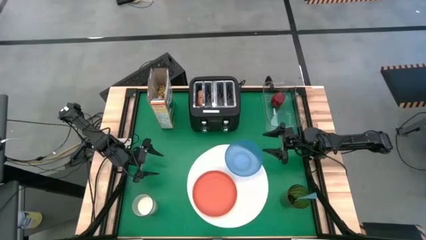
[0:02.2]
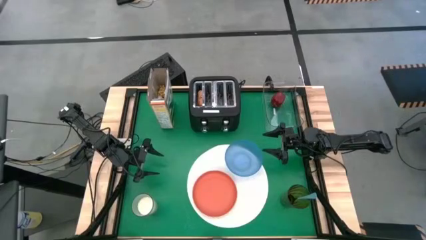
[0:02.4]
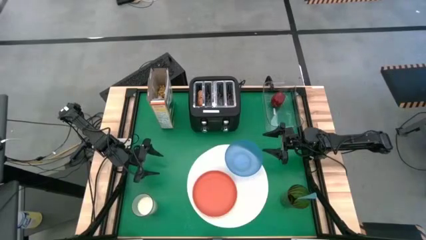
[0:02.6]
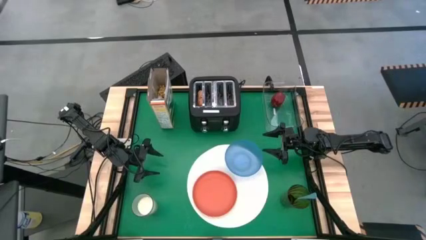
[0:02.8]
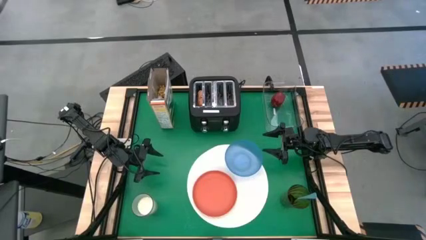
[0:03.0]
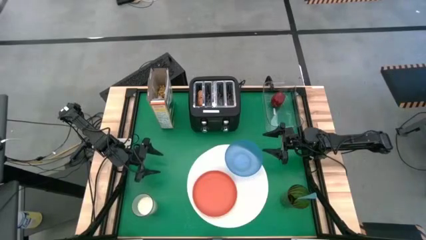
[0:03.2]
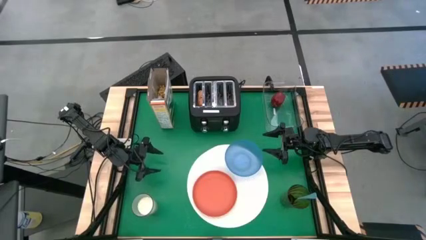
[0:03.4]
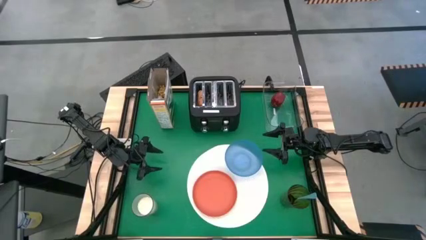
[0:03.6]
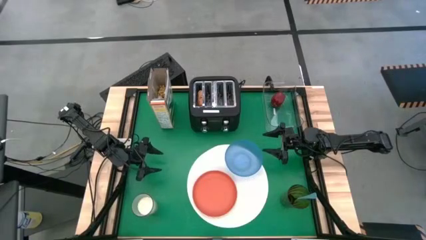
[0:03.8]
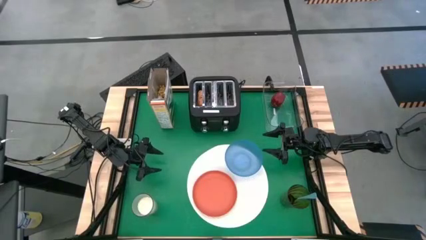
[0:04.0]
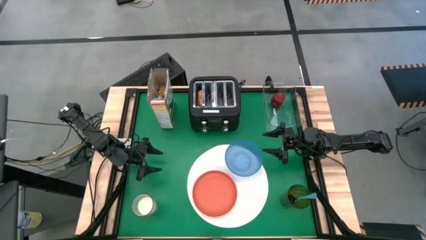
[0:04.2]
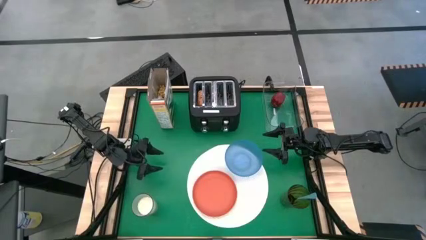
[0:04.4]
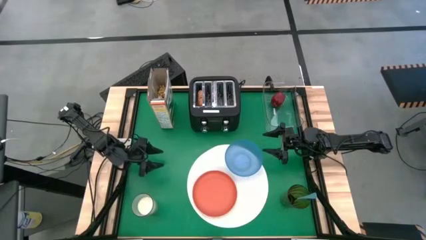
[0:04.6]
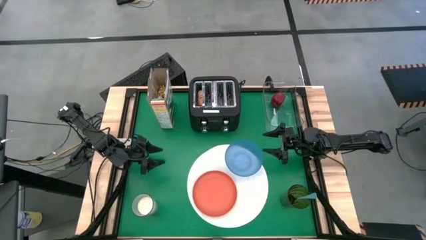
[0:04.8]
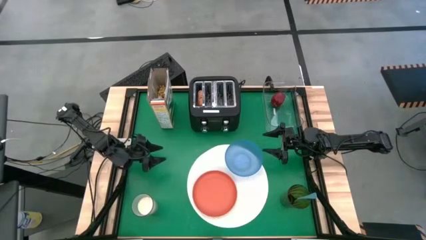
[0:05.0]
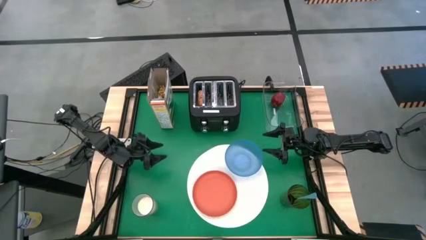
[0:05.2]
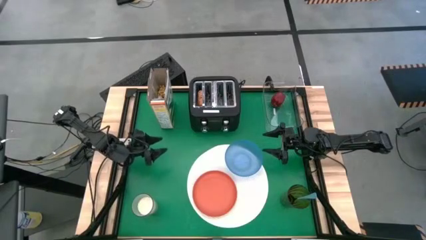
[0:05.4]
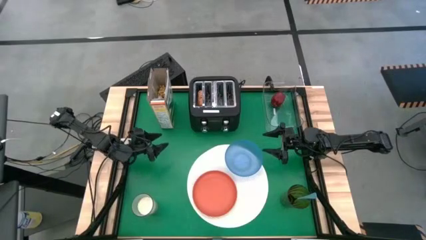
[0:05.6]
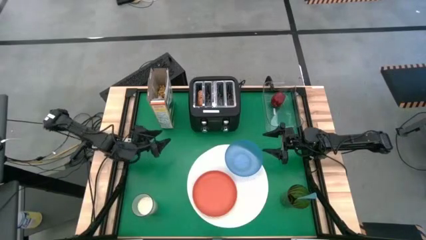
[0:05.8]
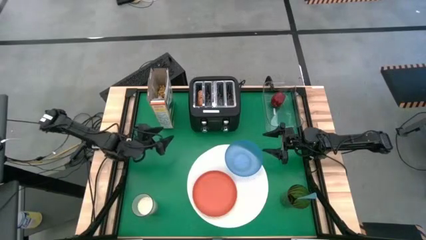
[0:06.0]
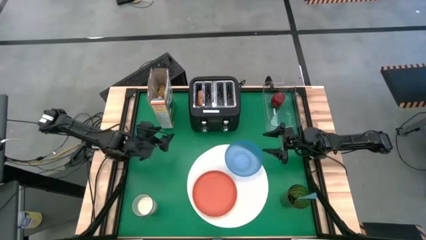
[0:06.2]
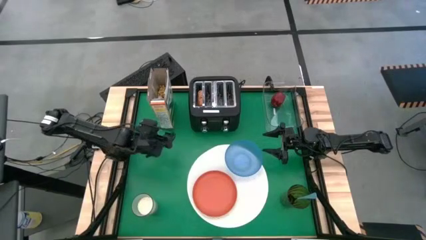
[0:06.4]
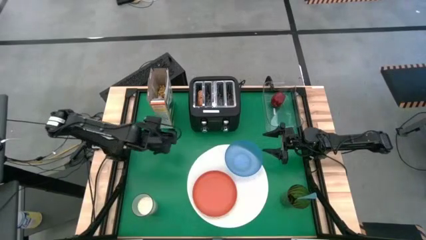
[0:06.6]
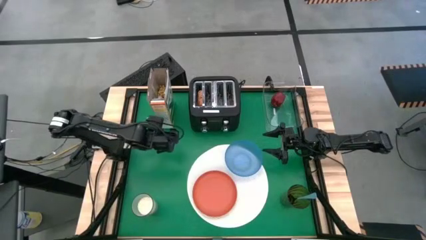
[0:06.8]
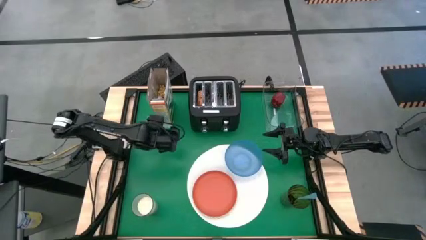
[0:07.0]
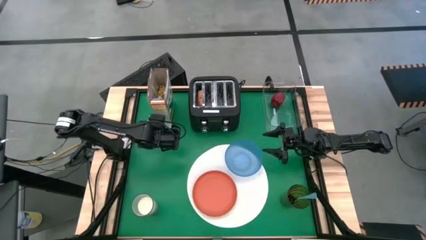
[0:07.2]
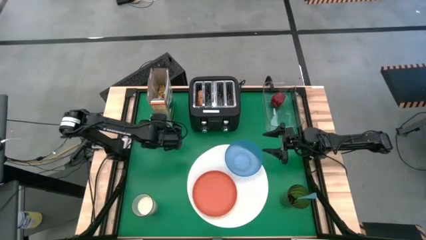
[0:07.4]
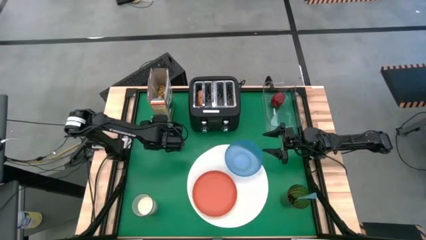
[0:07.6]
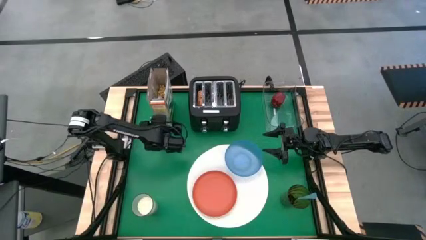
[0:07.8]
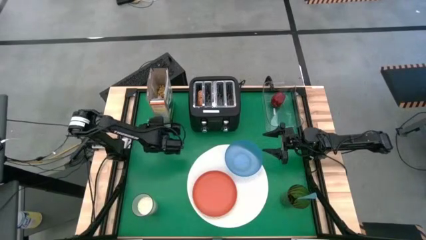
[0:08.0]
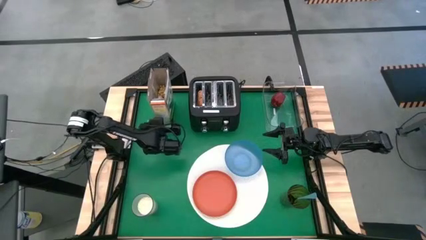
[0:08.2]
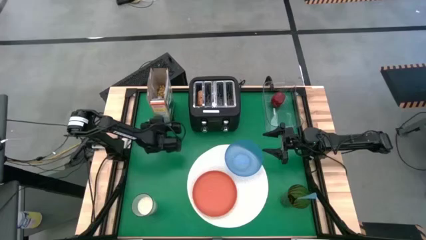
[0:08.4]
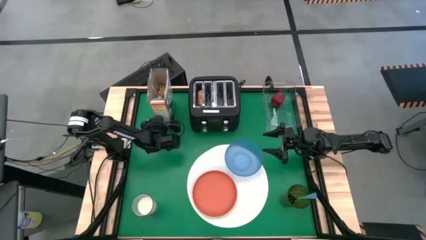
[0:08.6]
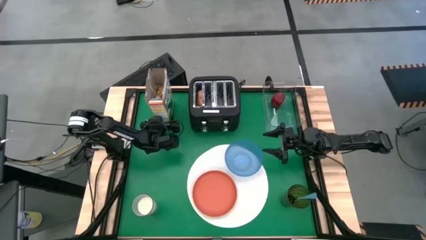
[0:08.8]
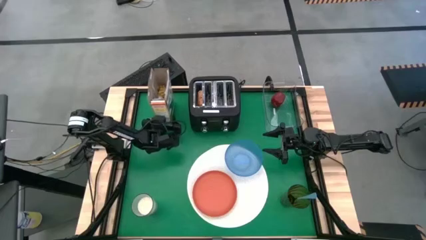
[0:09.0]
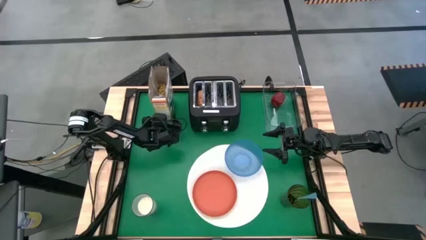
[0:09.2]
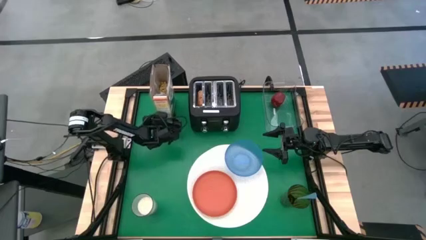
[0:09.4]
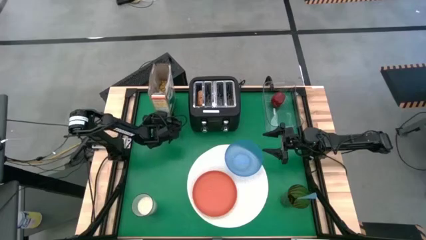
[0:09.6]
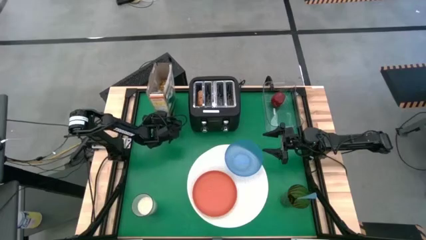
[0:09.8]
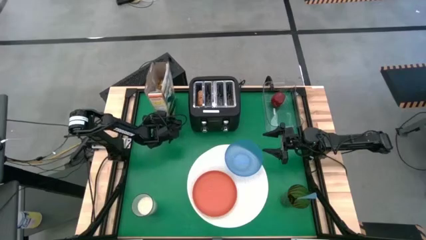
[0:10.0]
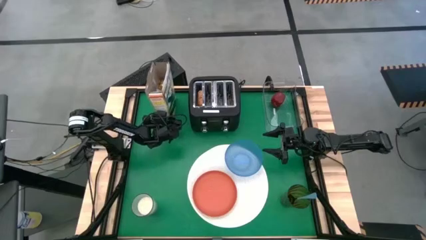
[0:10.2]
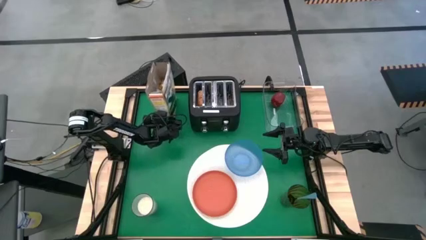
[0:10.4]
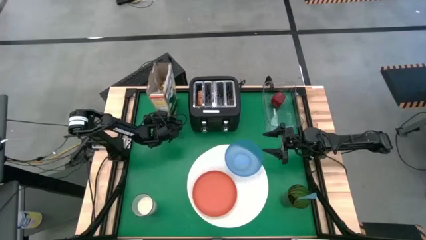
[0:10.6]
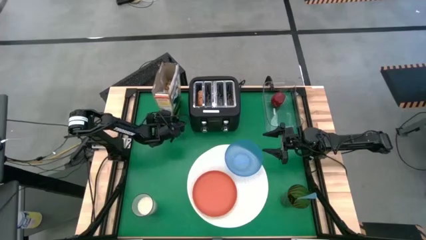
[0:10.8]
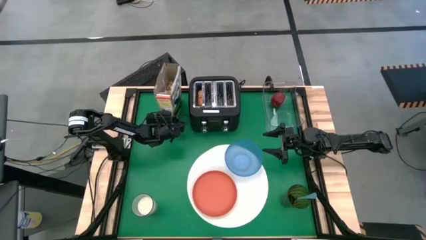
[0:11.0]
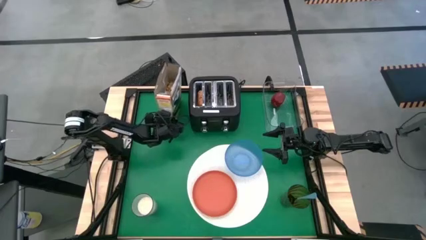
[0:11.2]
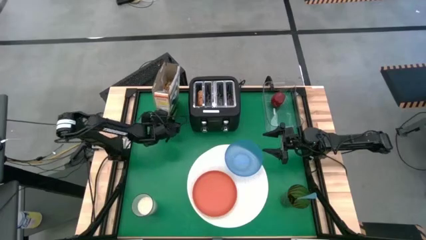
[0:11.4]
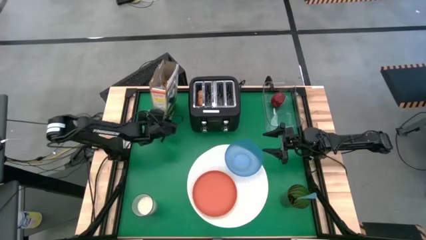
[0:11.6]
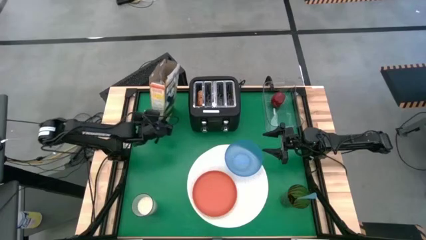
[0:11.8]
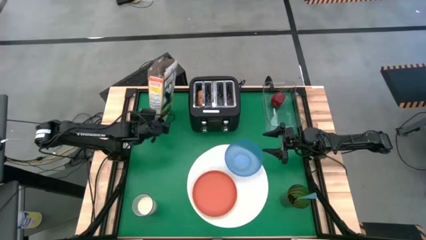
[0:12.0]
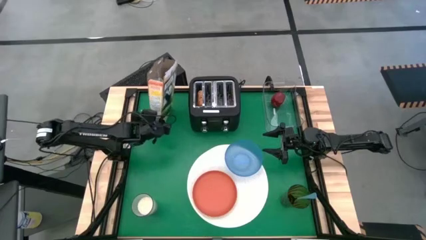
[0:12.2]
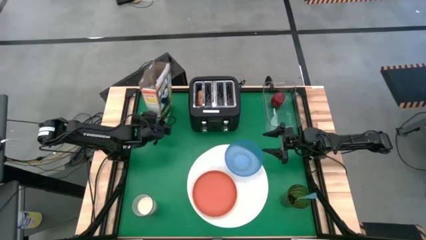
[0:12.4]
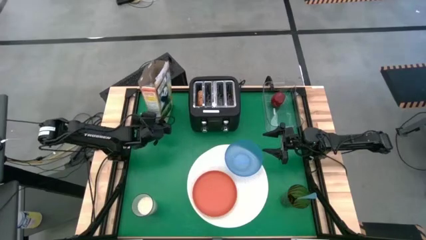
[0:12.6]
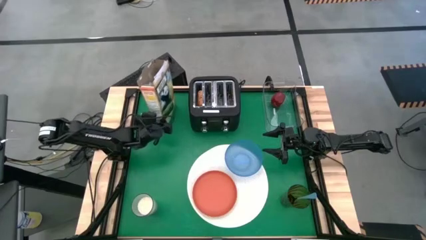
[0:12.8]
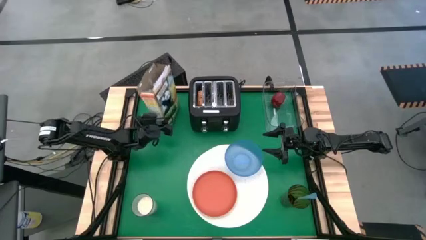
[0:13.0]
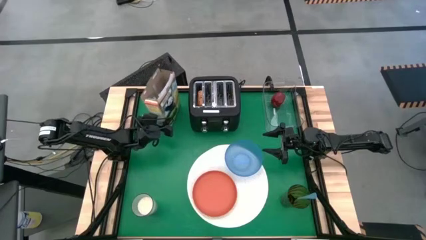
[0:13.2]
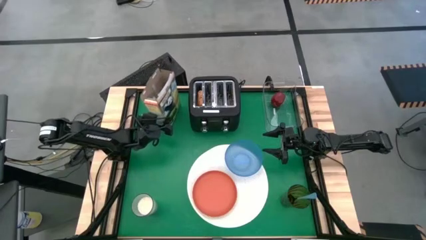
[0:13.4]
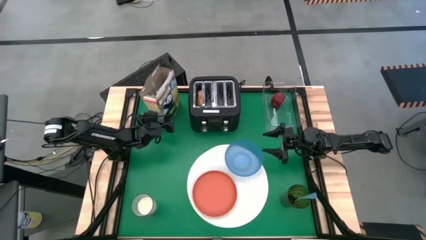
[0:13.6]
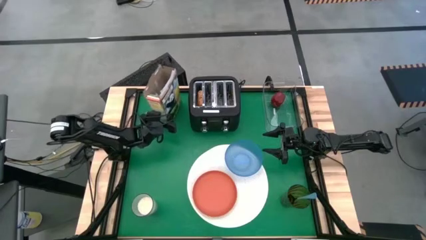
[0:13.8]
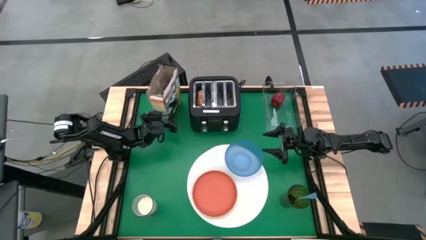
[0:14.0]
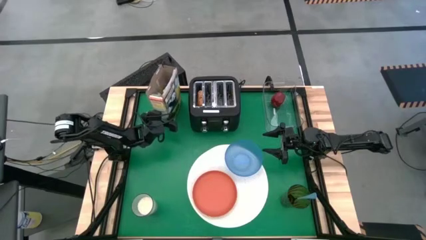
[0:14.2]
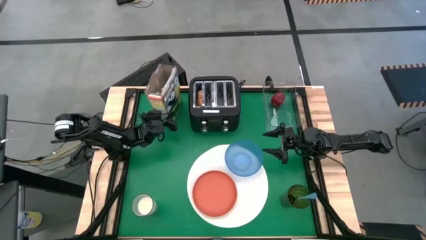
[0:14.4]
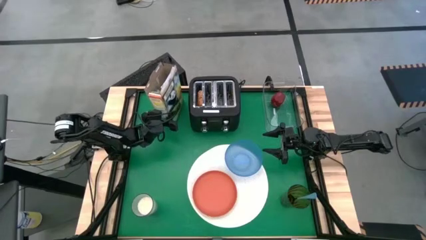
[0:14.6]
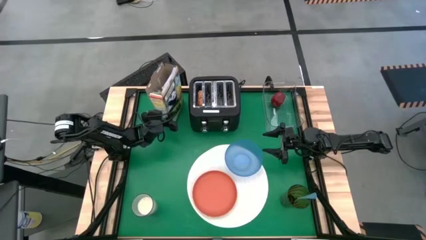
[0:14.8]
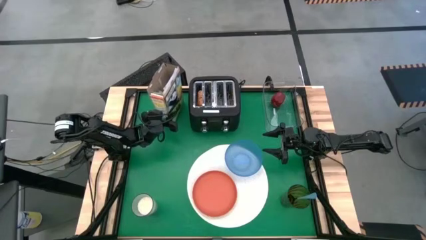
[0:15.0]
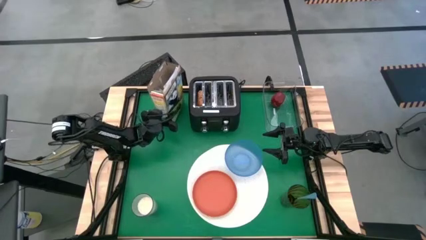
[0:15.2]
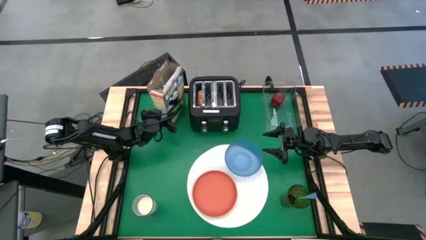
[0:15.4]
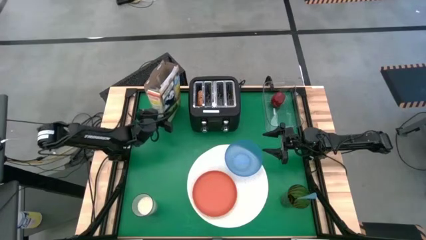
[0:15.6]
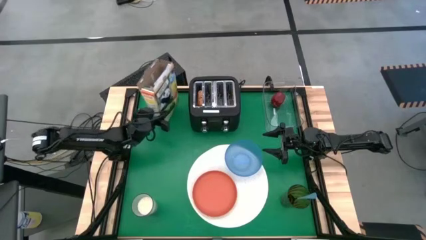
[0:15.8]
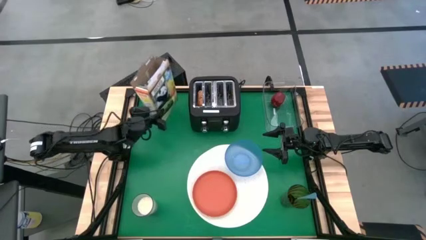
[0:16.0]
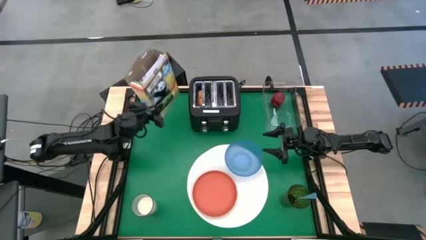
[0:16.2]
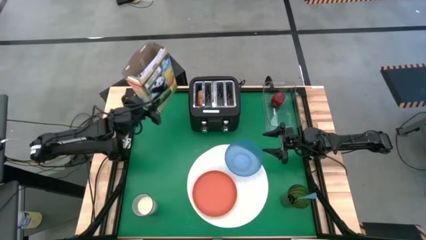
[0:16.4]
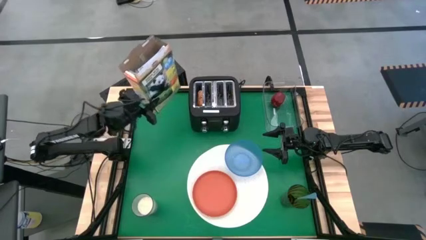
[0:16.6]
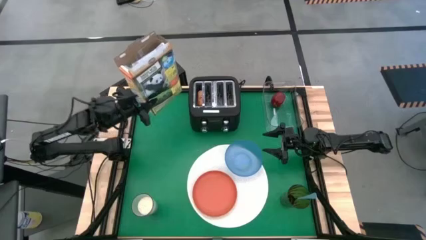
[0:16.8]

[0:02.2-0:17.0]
Task: Arrange a breakfast setting
Pour the cereal into the blue bowl
